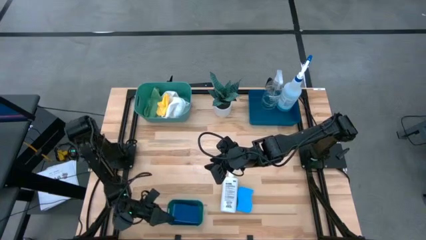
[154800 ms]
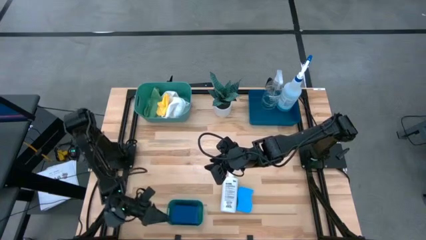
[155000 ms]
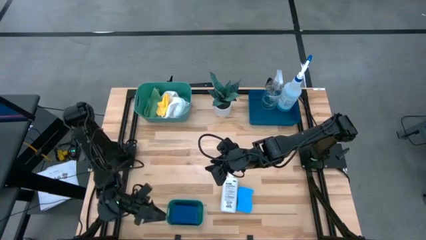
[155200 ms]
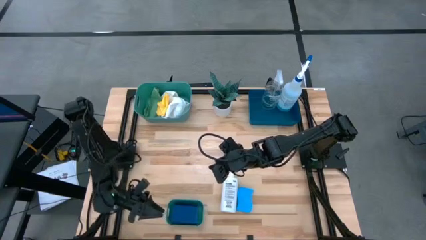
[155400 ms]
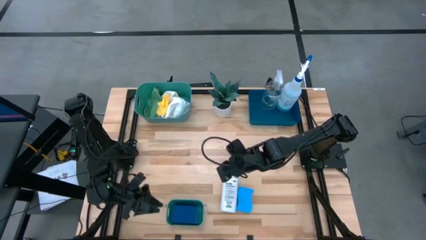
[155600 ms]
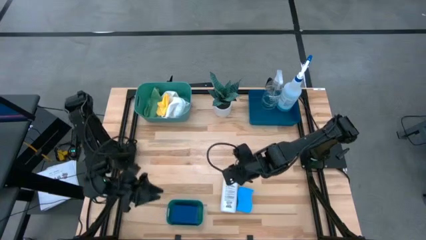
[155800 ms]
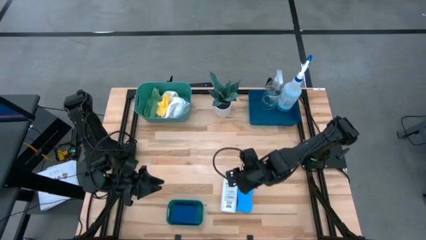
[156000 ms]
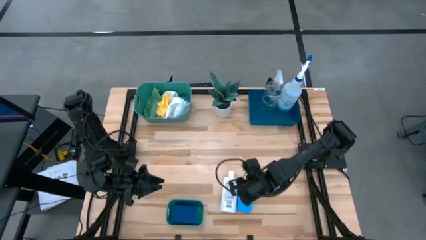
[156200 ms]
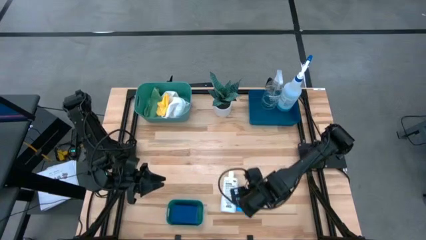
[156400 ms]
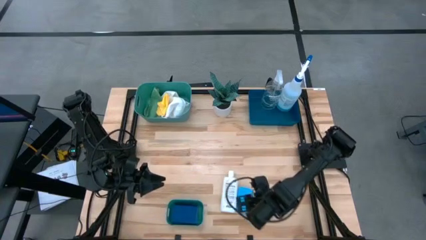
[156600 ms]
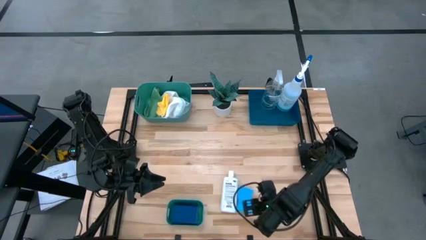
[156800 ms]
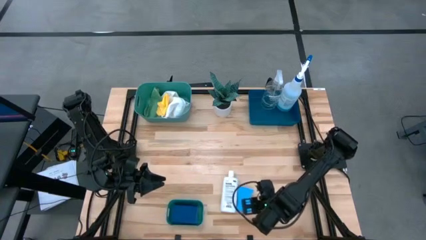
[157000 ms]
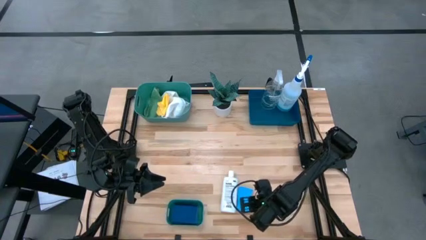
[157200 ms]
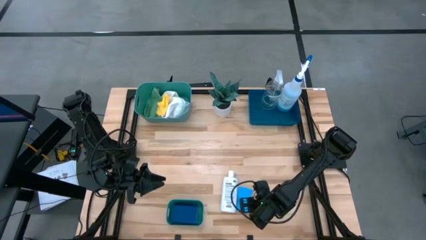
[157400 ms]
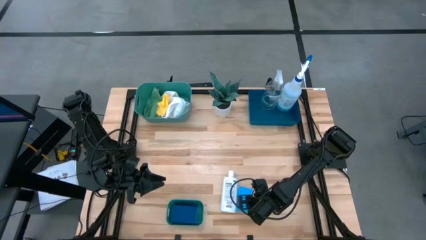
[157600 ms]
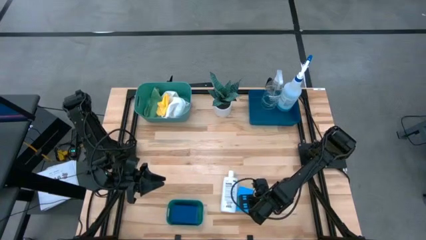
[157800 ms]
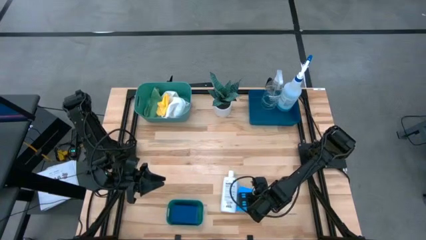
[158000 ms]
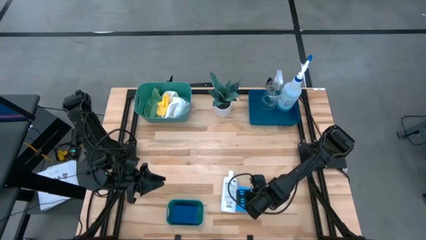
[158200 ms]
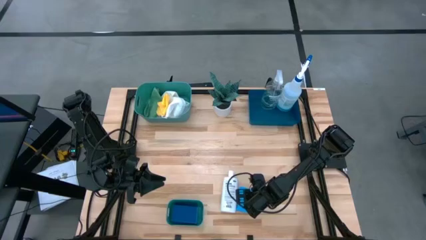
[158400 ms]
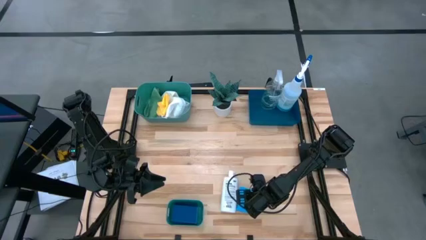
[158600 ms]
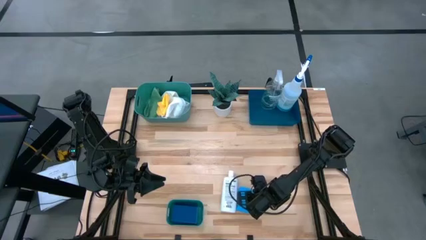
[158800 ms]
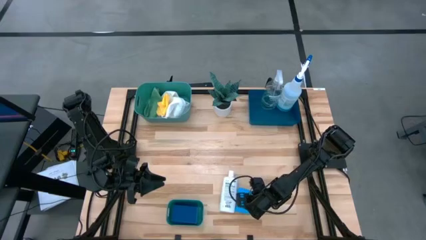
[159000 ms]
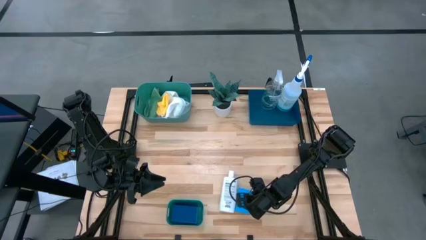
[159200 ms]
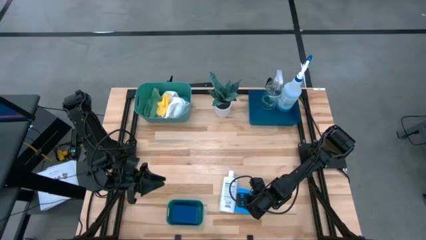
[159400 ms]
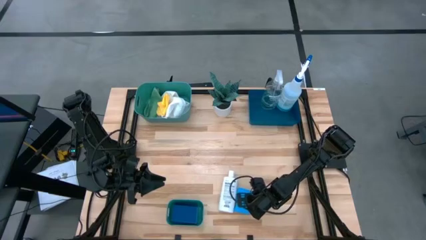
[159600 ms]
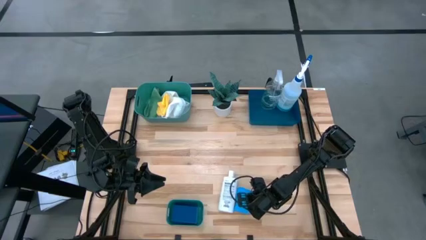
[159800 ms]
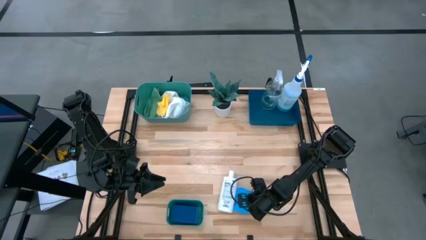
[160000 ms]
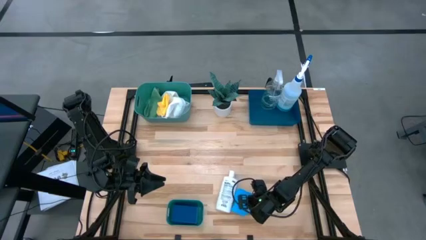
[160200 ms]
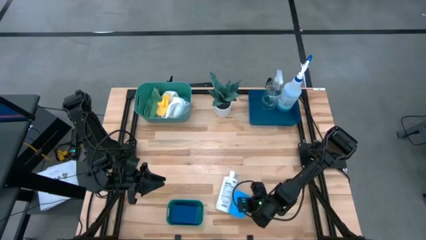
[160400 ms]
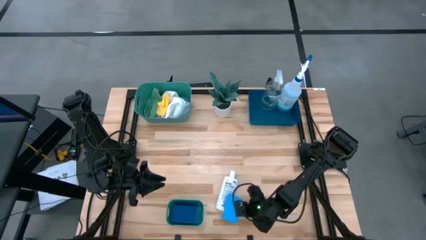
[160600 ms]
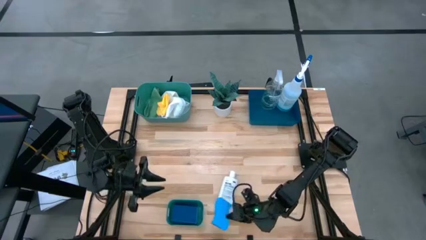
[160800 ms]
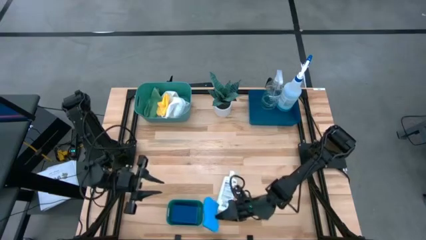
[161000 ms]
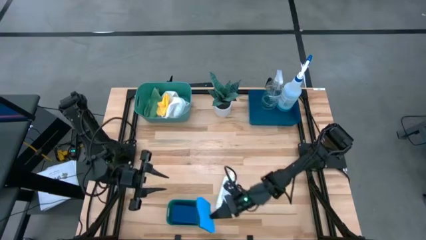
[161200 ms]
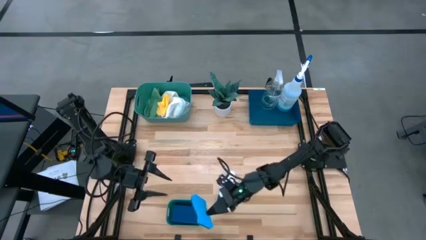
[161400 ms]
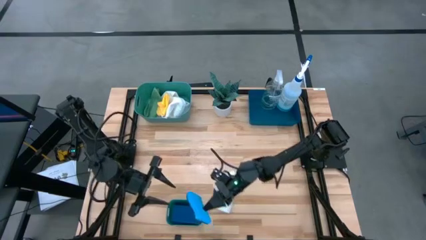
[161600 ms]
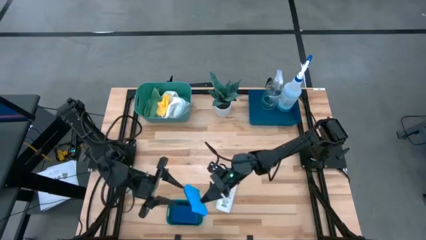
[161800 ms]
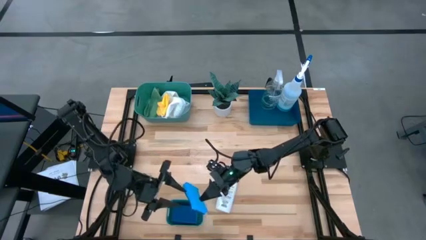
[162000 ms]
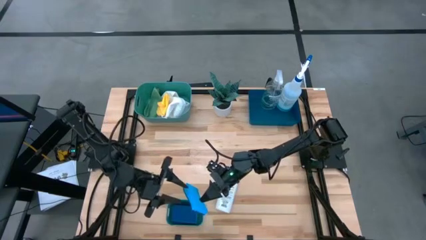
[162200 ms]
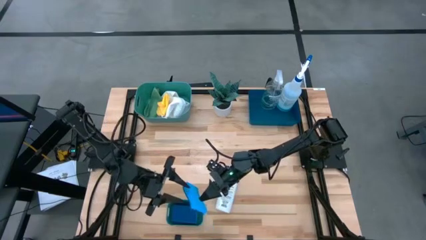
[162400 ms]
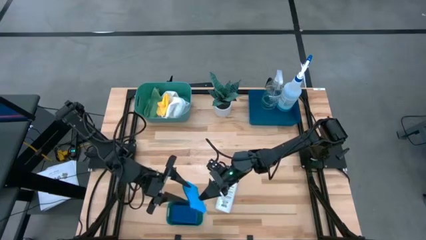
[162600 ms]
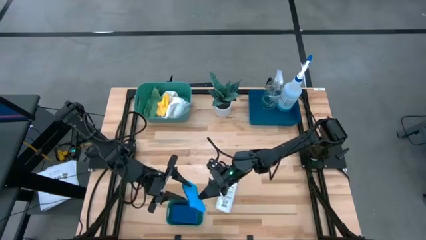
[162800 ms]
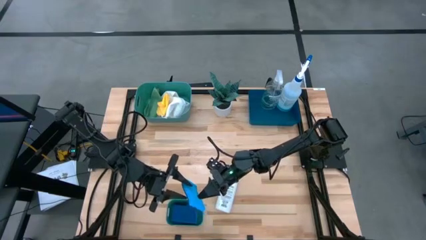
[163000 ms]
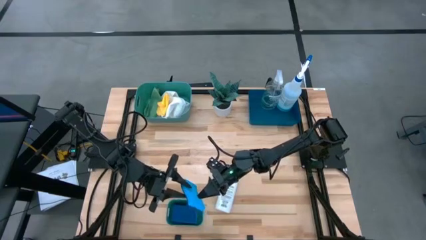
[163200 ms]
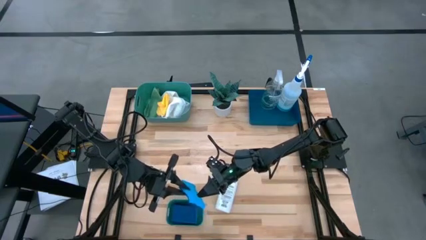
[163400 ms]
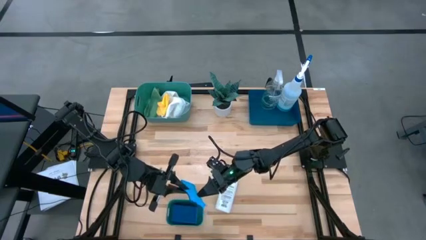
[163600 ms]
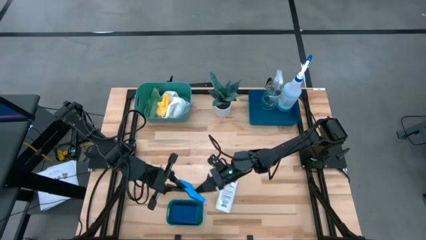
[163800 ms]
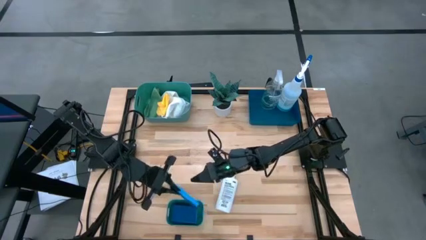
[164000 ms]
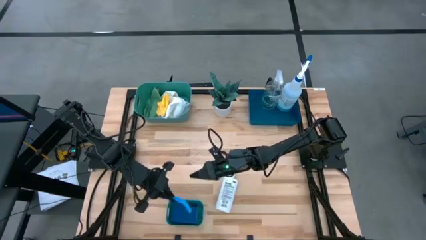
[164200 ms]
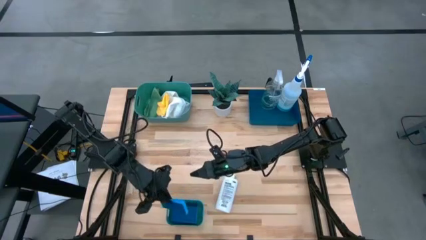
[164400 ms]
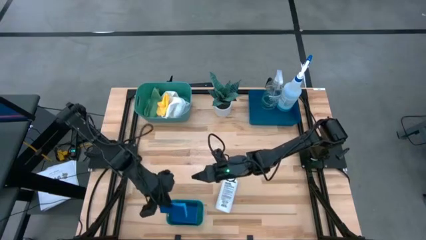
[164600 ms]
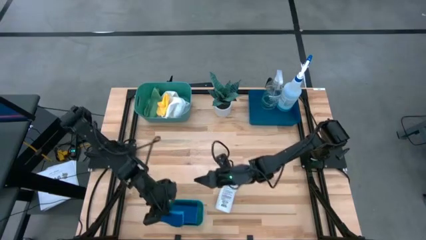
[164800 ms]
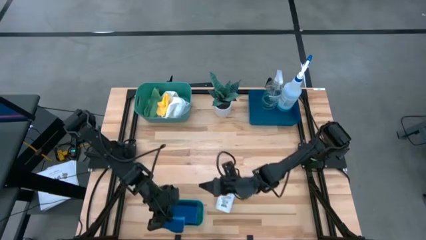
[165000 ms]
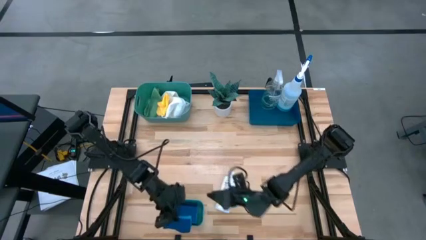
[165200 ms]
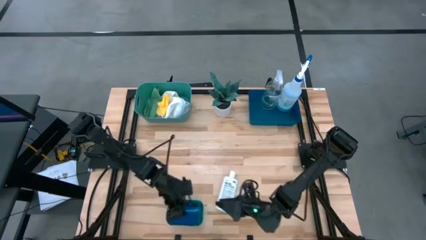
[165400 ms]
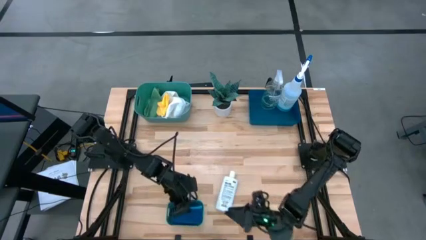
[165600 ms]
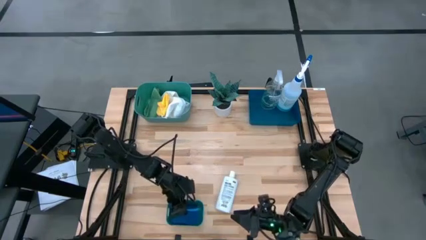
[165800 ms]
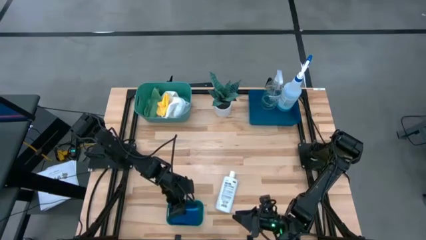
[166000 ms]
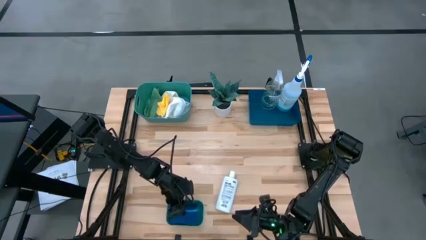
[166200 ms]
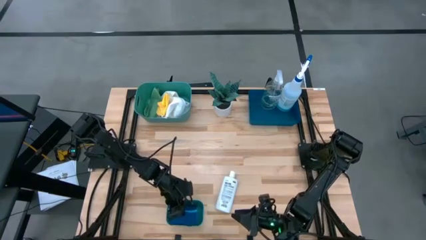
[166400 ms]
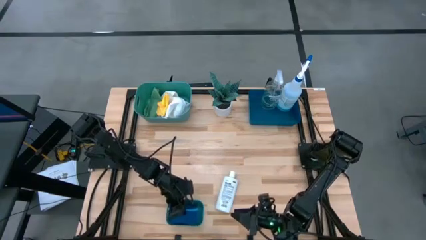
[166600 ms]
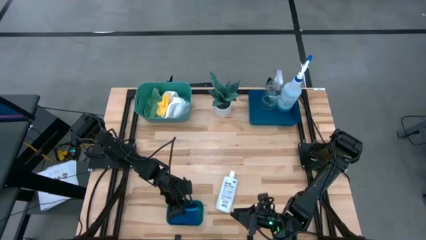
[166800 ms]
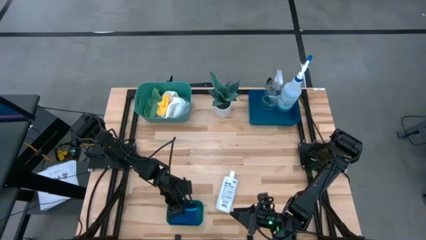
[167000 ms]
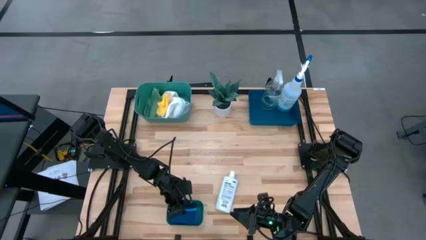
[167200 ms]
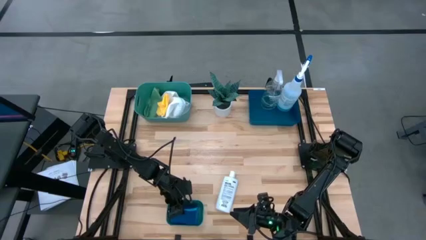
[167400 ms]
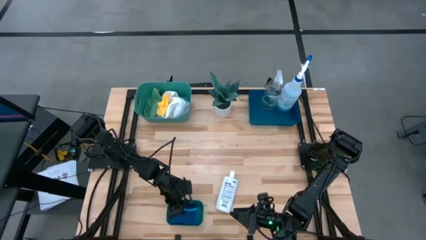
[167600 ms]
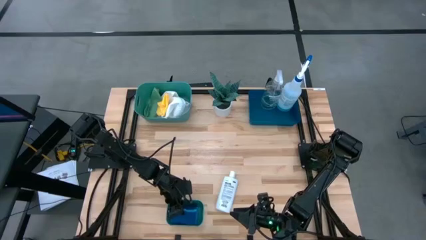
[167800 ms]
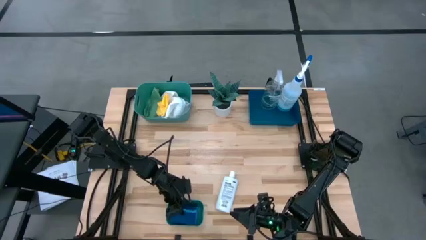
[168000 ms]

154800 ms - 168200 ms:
Task: Pick & Place Kitchen Items
Put the blue sponge into the bottom green bin

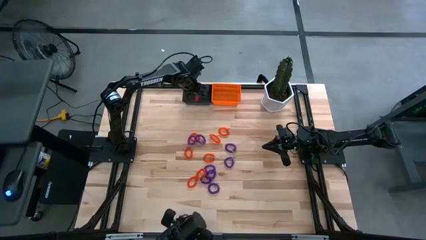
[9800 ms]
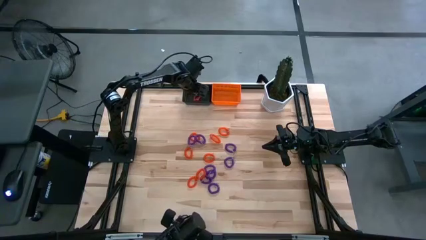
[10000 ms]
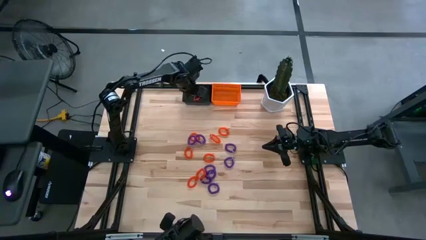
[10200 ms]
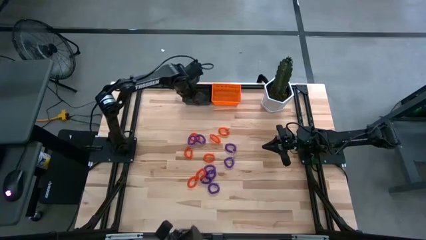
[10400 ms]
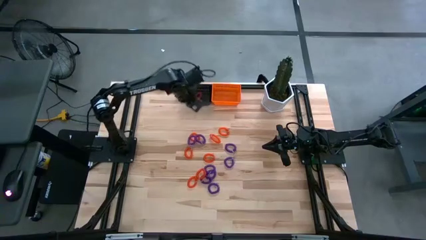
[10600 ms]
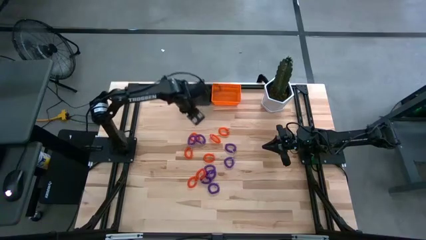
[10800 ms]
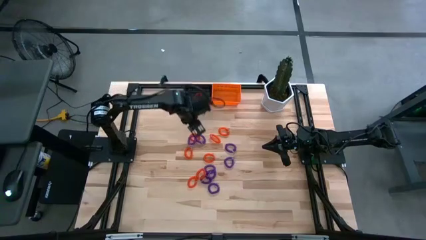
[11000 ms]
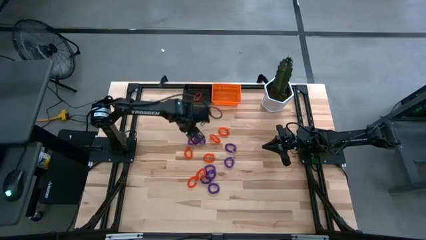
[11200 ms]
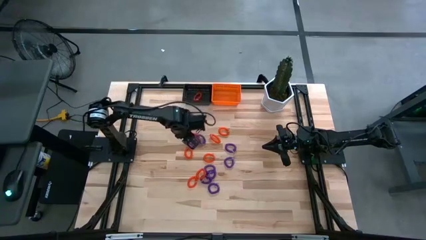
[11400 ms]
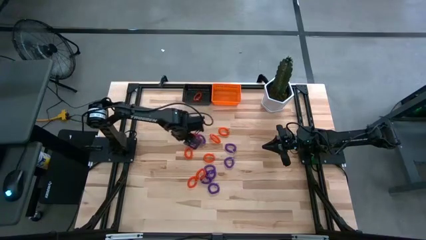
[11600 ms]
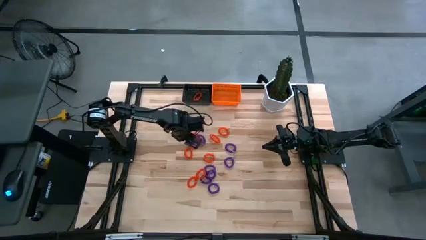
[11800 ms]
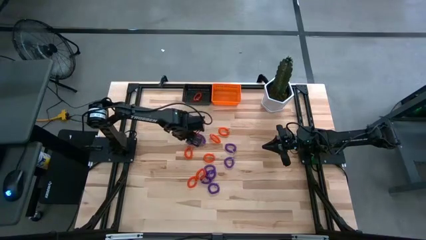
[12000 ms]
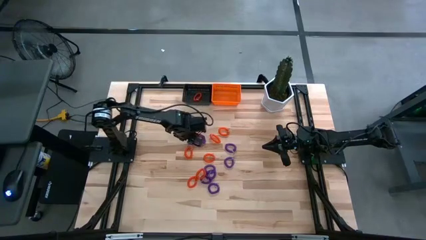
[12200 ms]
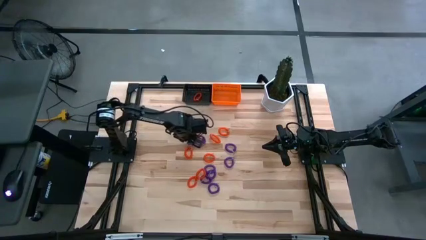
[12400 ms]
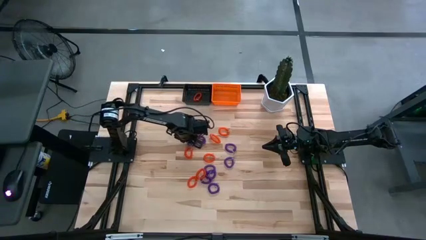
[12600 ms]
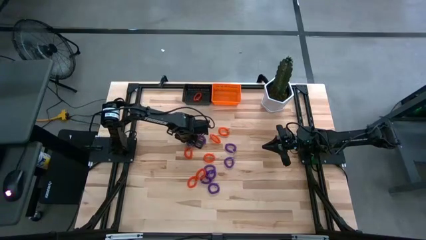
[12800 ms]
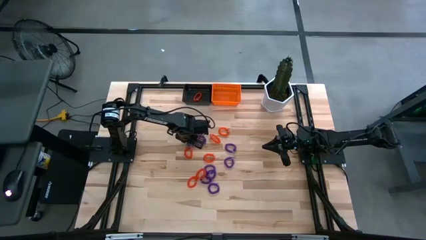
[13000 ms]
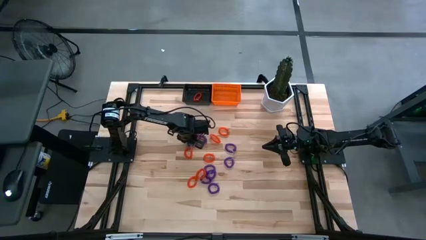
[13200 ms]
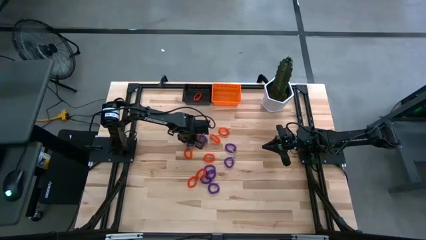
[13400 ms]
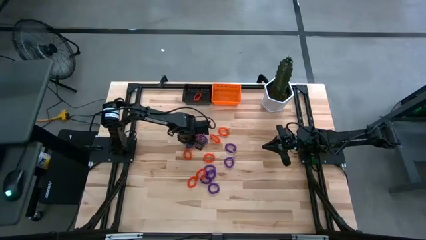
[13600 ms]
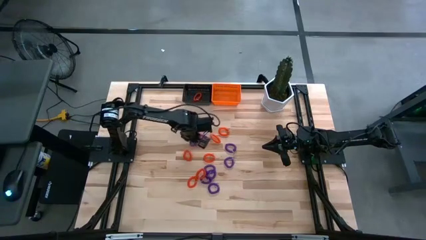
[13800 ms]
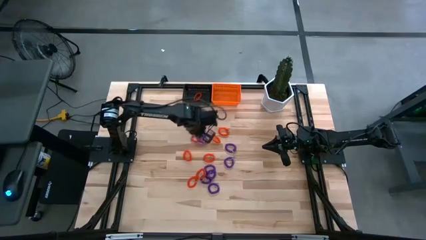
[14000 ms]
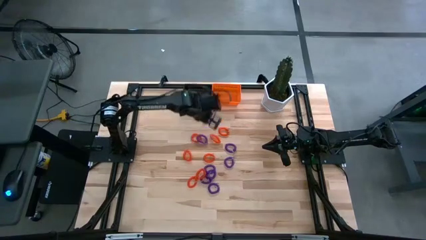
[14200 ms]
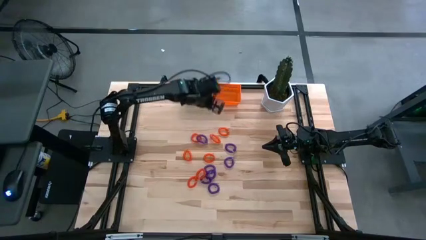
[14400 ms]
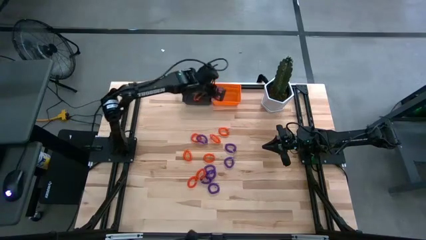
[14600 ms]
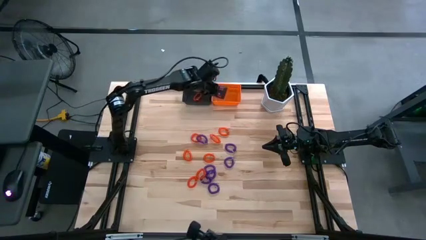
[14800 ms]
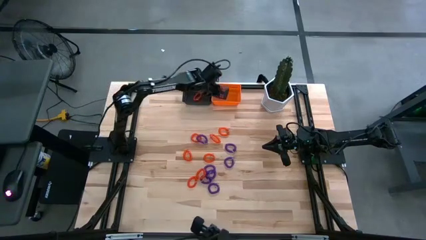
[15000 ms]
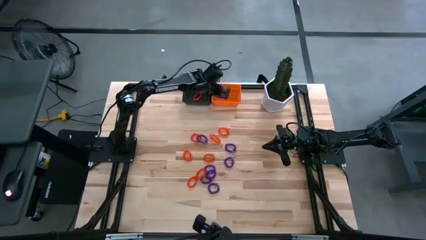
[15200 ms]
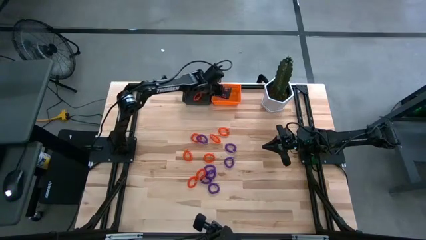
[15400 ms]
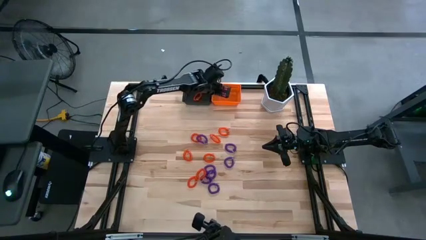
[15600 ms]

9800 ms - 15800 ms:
Task: Sort spring keychains into baskets
Put the violet spring keychain into the orange basket
